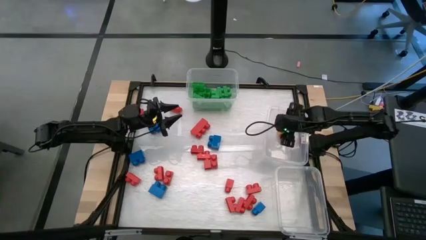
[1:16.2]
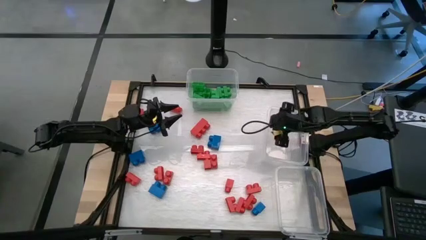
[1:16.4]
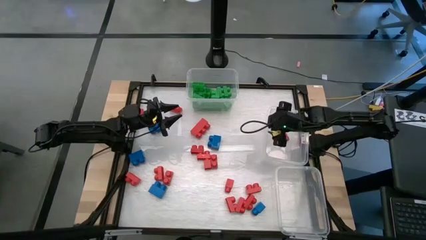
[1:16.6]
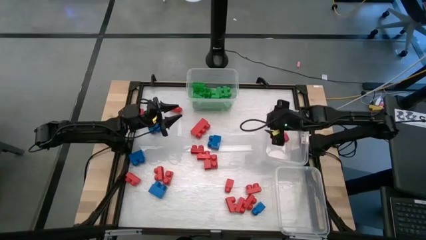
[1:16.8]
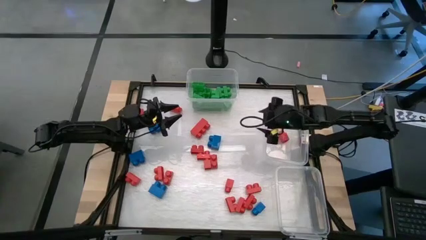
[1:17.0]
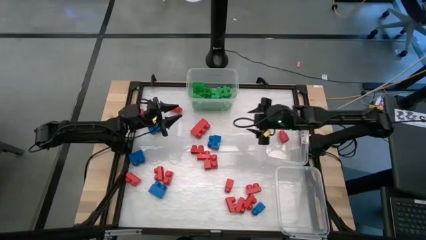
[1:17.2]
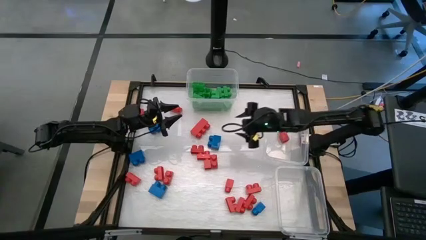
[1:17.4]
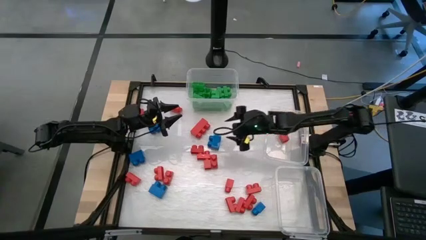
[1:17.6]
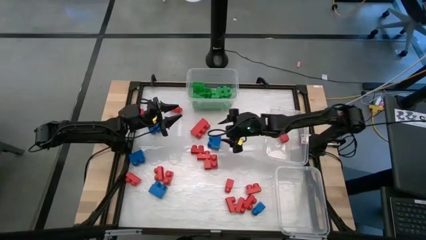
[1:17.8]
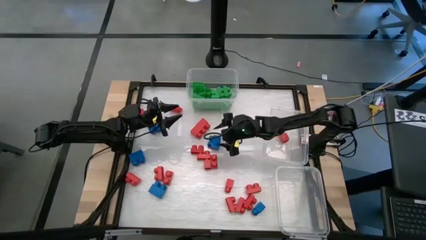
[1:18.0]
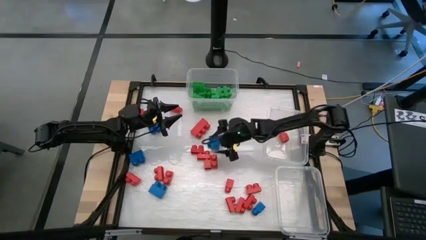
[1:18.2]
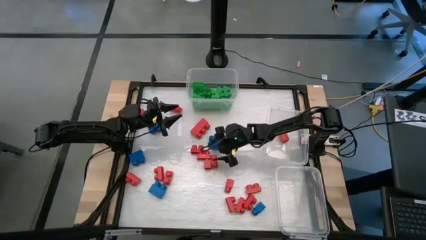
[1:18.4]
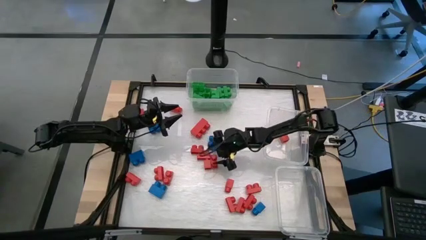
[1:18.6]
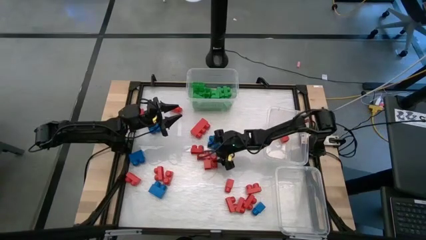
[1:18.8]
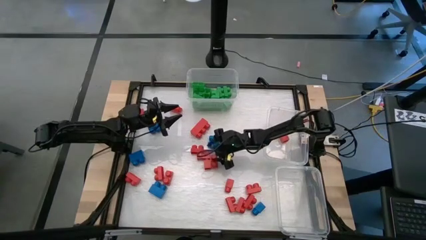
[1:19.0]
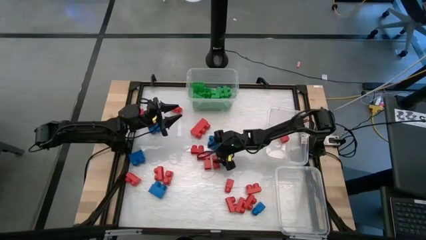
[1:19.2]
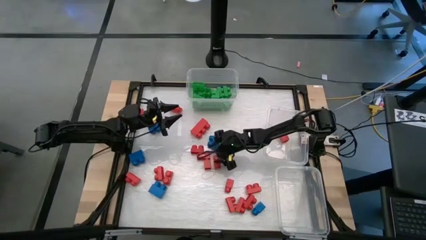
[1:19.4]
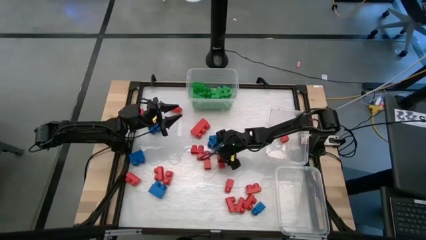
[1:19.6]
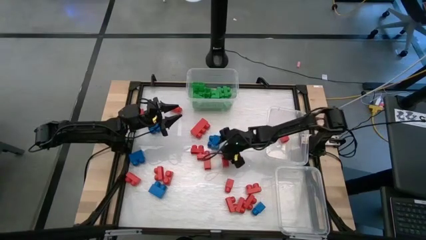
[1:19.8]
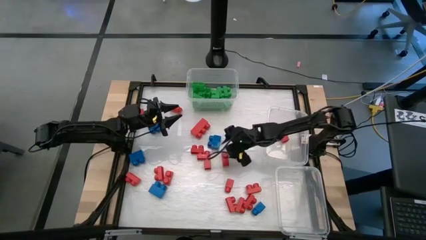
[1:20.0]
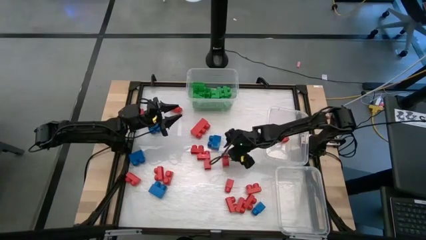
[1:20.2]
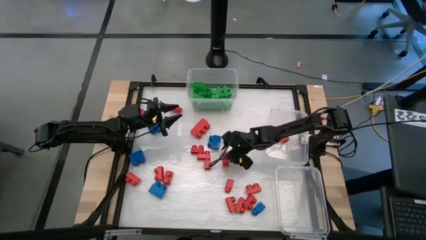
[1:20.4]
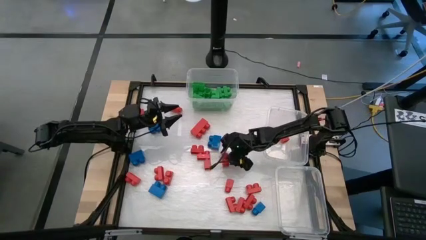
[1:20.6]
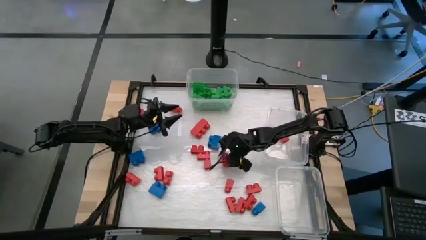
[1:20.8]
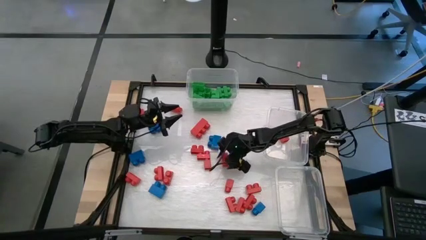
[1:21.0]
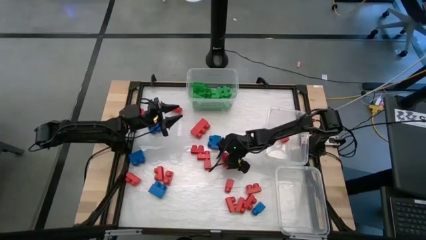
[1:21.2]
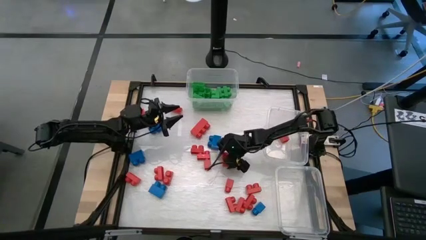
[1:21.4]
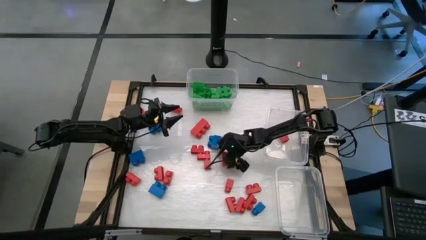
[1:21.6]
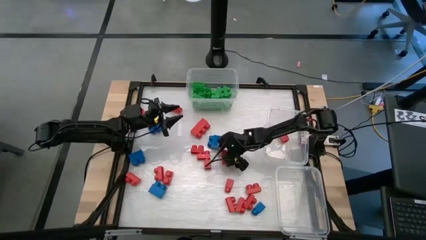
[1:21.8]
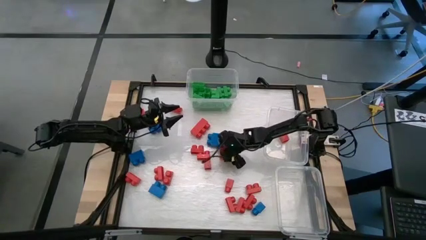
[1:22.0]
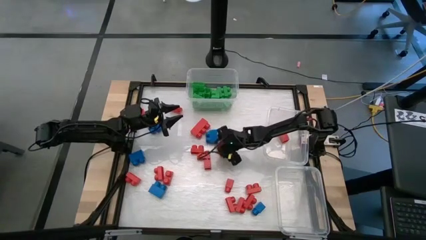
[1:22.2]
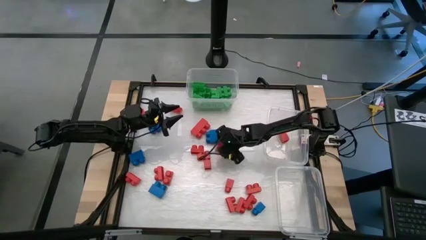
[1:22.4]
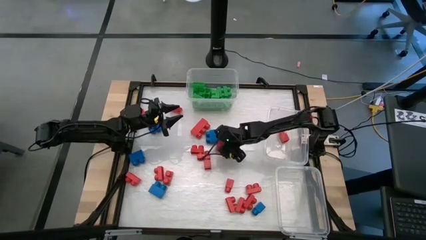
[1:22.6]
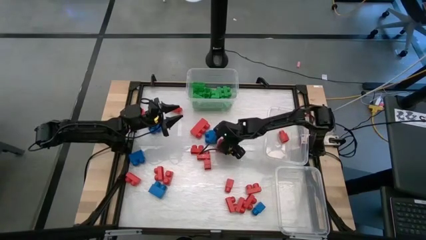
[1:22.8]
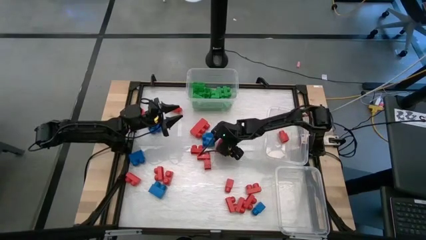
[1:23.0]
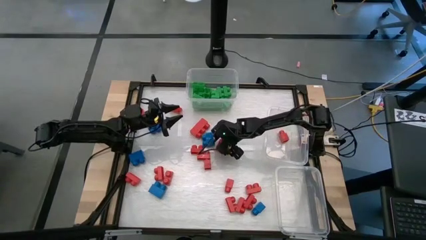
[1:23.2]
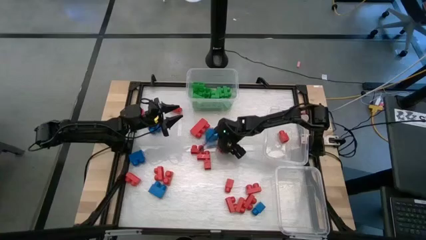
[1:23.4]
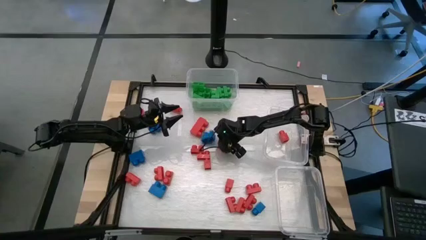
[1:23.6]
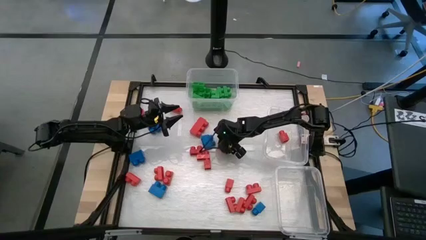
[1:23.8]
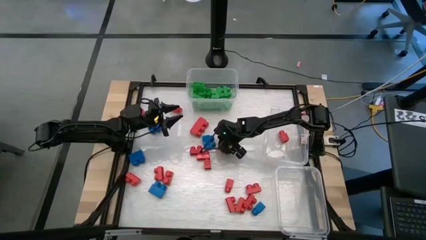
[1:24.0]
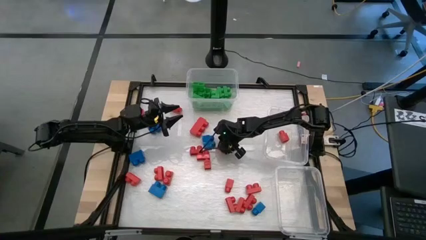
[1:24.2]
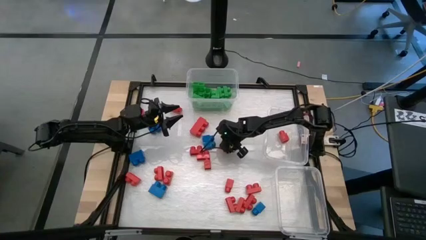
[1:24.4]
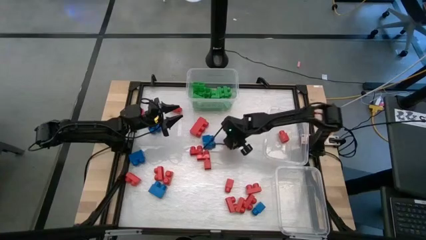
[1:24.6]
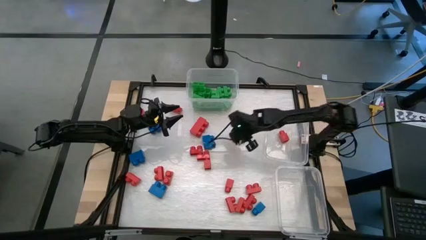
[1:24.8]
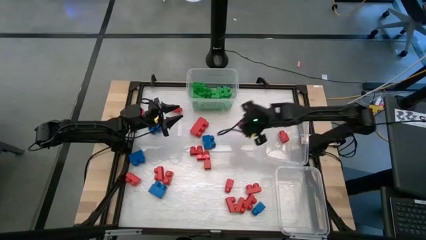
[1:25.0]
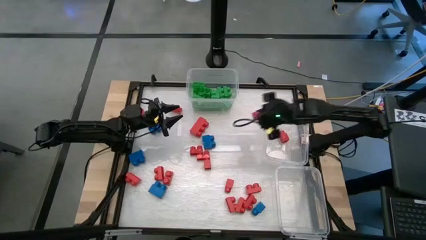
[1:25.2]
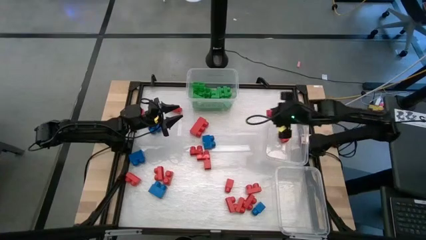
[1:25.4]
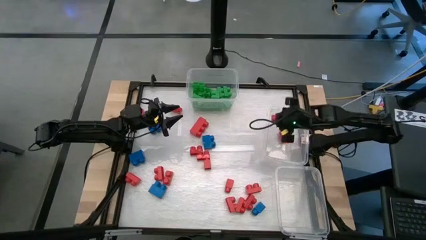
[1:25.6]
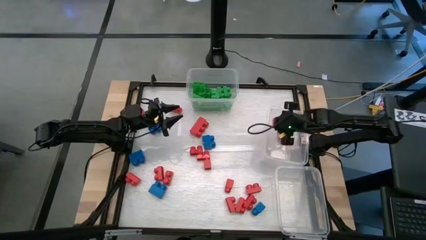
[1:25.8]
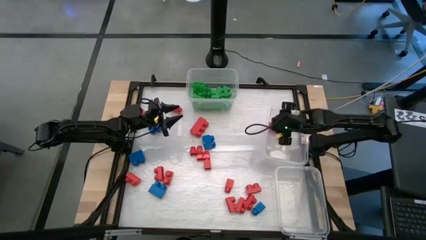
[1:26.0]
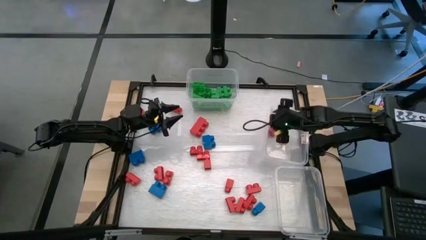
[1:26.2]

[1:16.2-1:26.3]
Task: Sort blocks
Put the red game piece into the middle right transparent bin

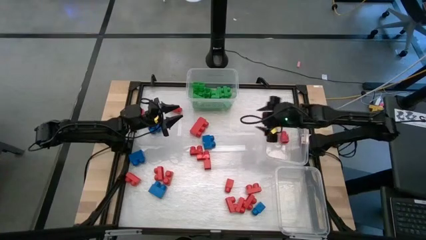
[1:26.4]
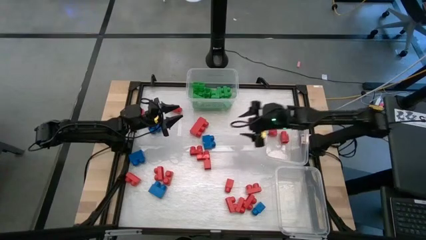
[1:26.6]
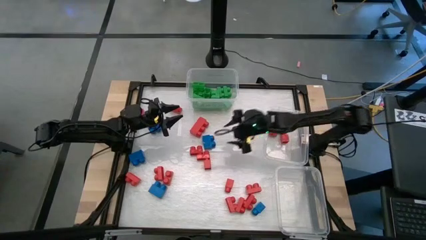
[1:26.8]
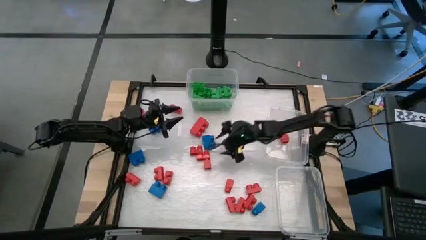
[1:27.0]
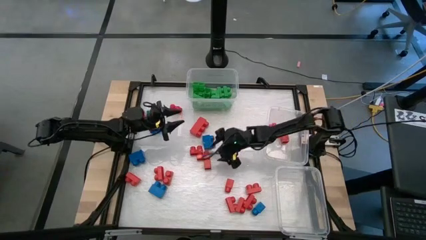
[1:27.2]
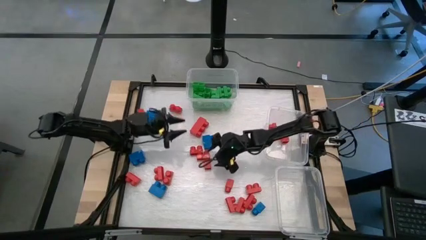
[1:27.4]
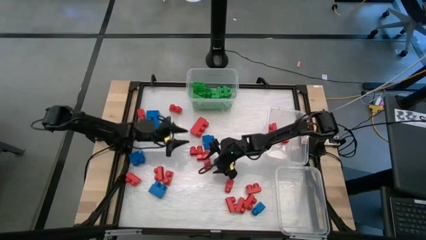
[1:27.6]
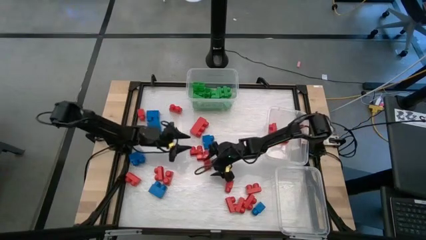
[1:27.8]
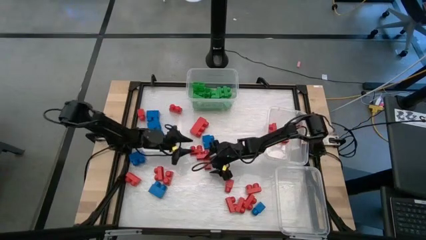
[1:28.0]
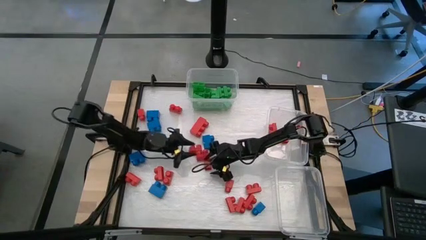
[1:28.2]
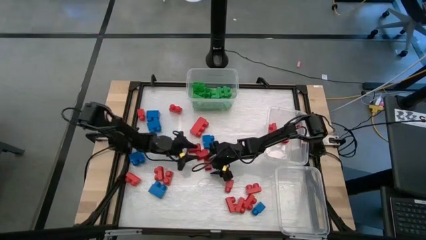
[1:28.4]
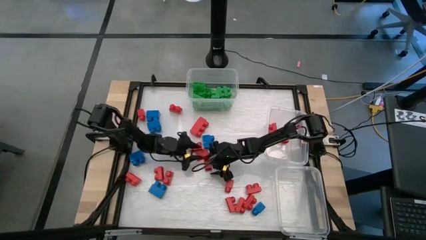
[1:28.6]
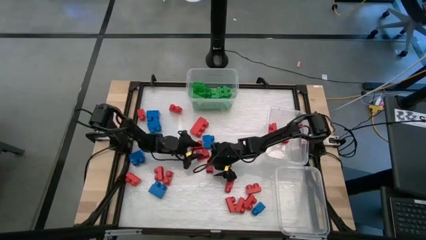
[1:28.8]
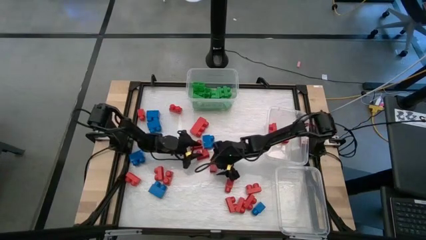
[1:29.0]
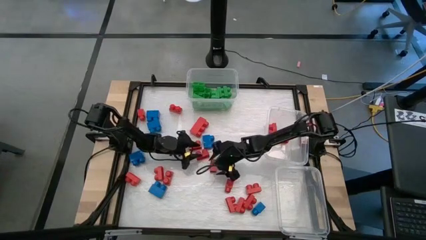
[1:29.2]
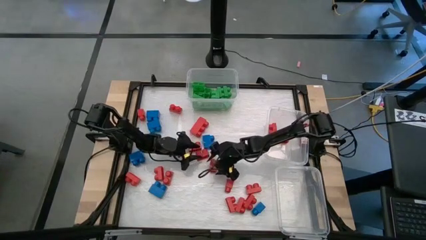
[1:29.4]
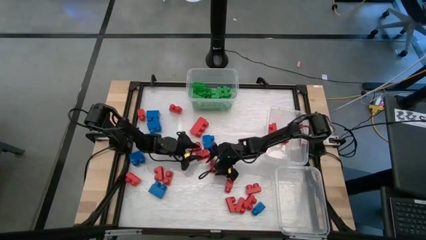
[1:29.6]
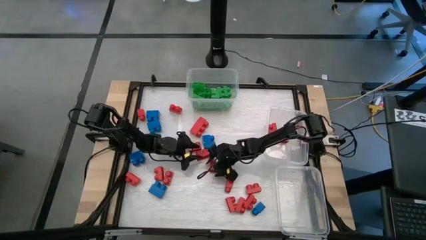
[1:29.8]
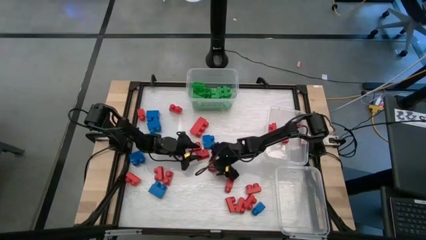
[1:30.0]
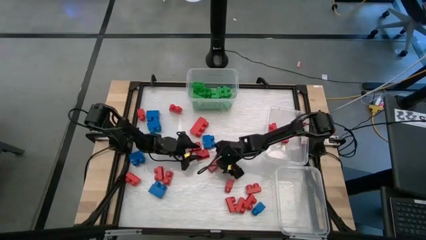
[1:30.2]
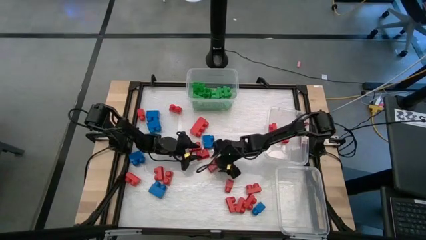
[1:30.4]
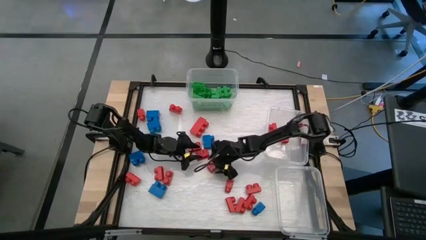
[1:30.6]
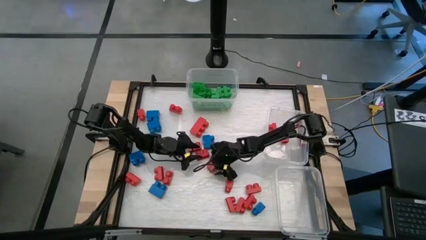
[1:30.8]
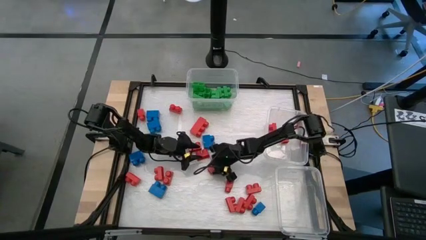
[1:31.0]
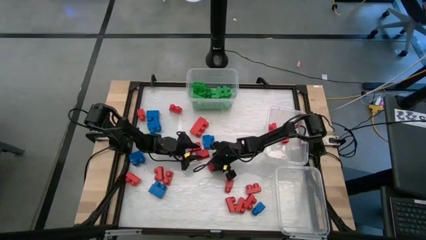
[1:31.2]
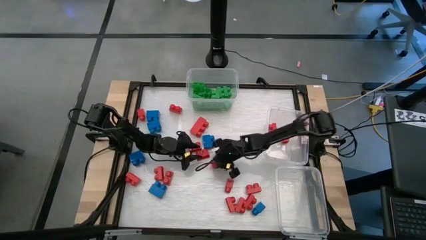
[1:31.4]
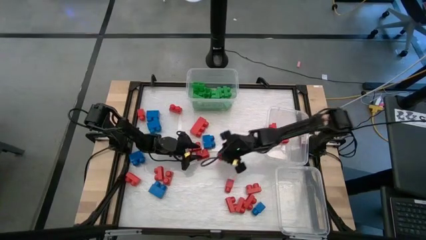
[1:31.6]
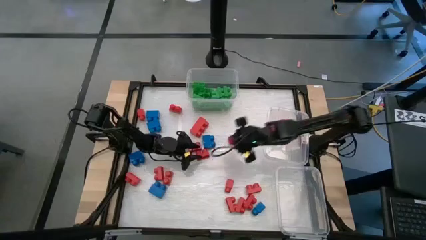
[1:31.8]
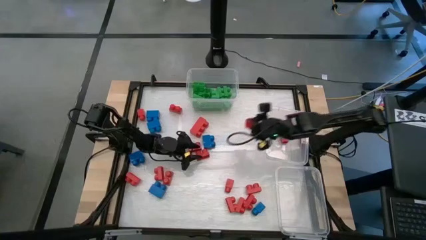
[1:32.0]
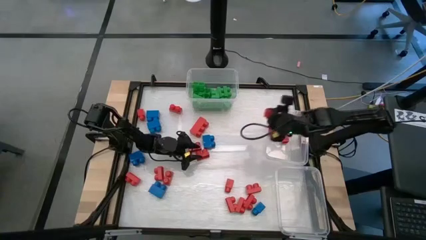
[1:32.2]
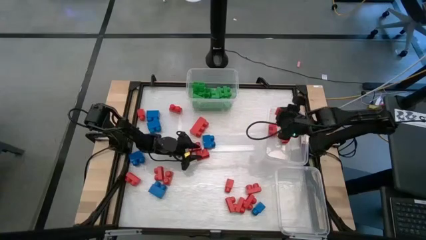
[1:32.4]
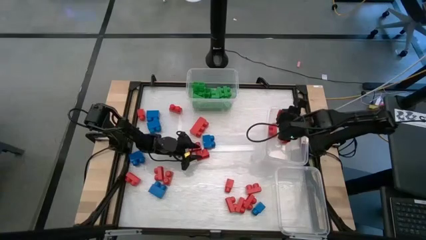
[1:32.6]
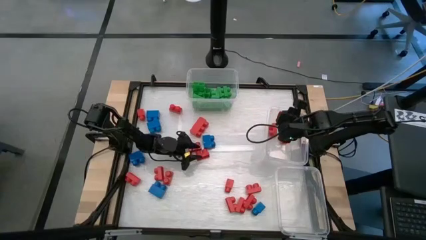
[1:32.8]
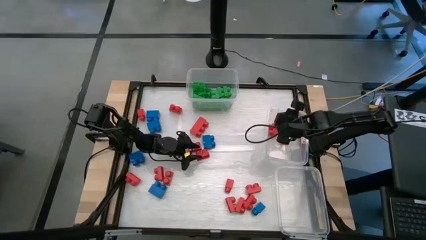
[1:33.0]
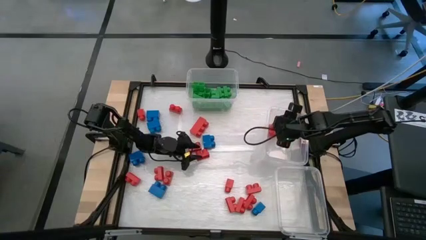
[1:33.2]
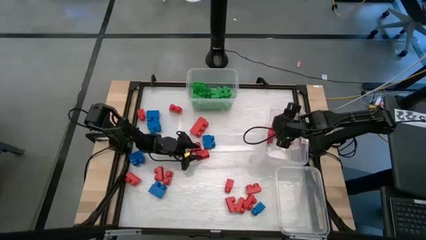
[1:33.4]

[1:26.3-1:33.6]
Put the red game piece into the middle right transparent bin
